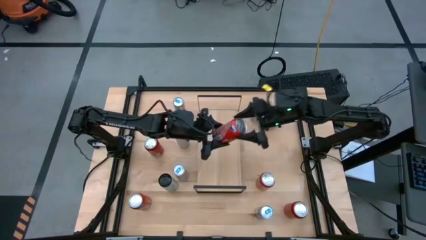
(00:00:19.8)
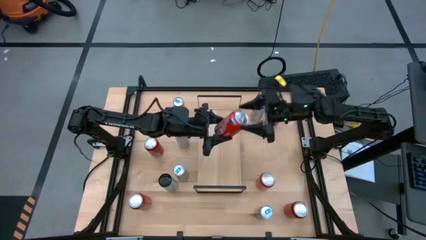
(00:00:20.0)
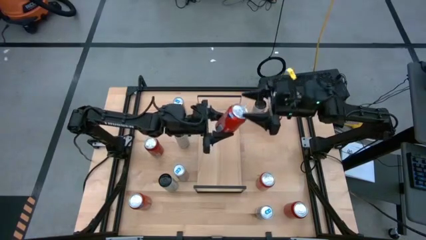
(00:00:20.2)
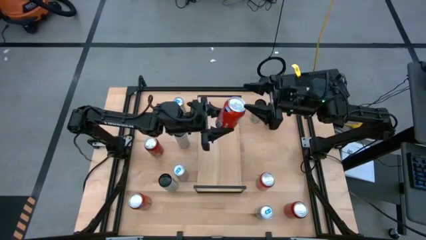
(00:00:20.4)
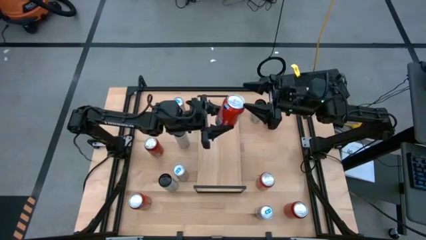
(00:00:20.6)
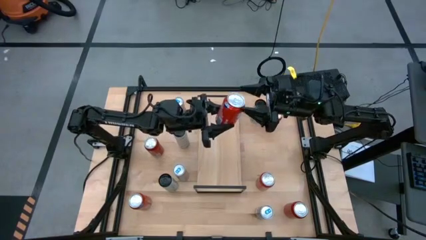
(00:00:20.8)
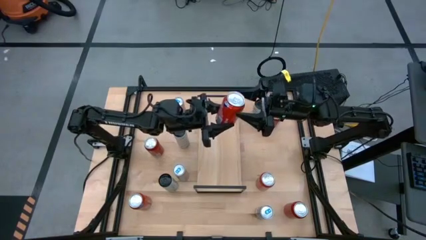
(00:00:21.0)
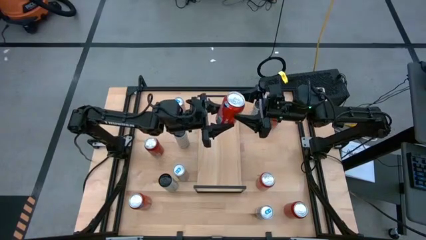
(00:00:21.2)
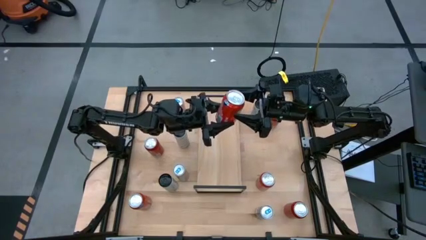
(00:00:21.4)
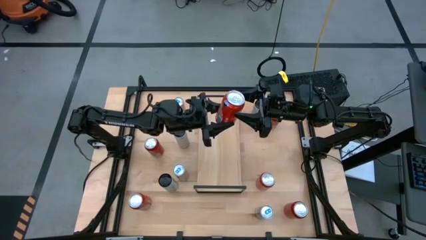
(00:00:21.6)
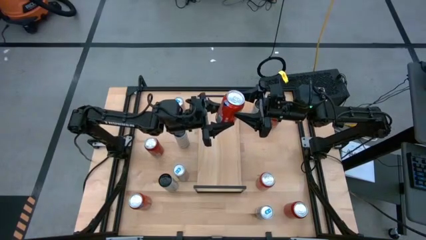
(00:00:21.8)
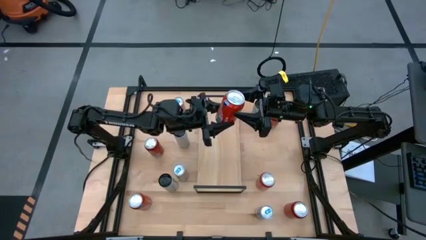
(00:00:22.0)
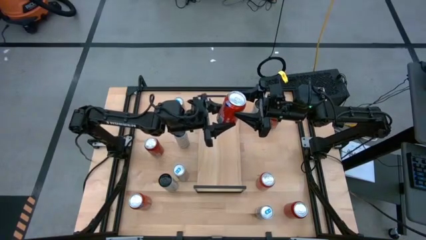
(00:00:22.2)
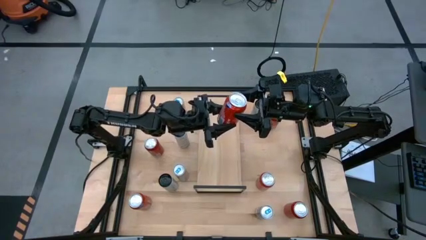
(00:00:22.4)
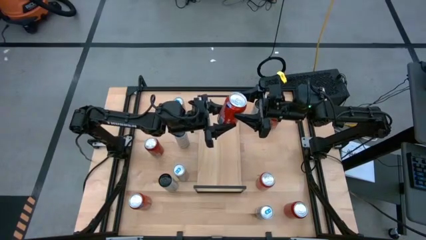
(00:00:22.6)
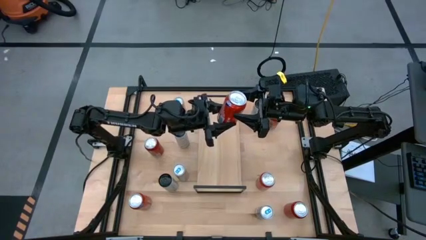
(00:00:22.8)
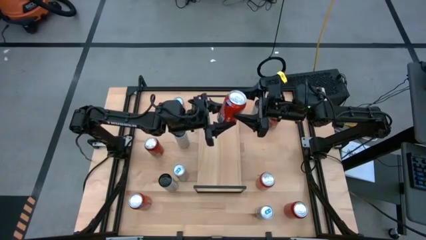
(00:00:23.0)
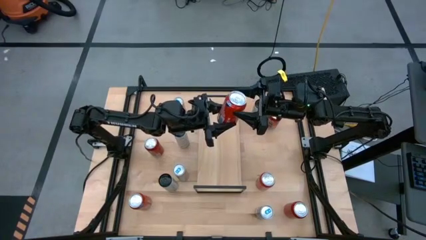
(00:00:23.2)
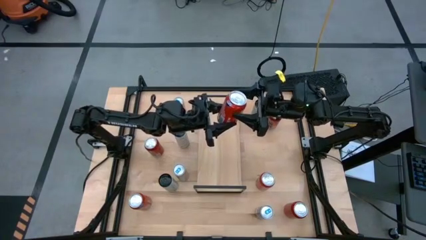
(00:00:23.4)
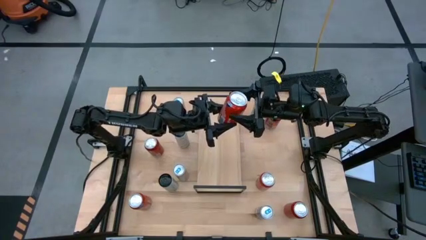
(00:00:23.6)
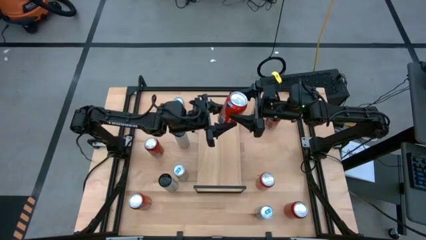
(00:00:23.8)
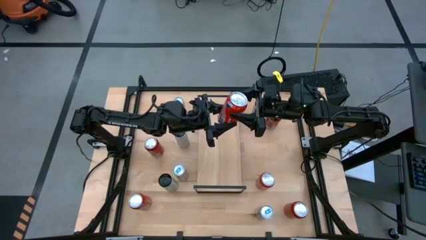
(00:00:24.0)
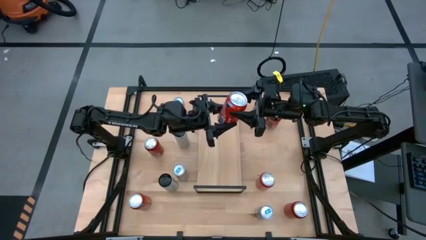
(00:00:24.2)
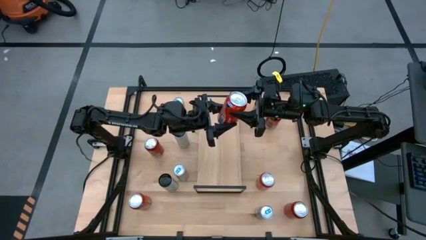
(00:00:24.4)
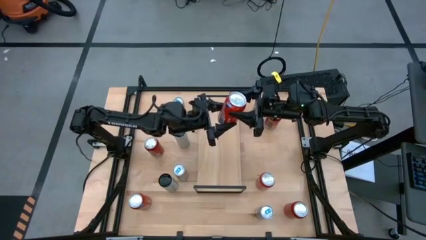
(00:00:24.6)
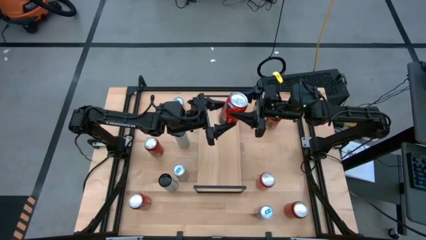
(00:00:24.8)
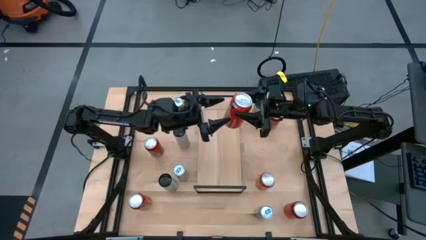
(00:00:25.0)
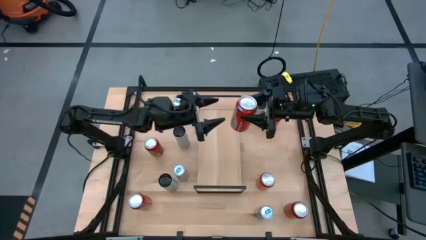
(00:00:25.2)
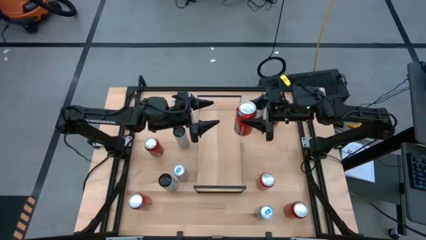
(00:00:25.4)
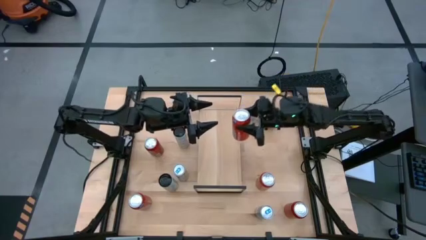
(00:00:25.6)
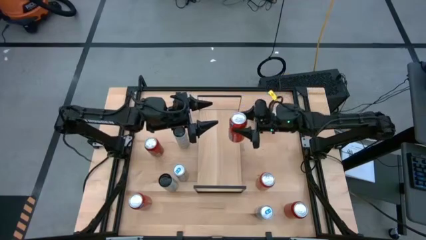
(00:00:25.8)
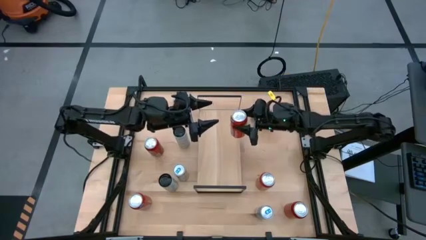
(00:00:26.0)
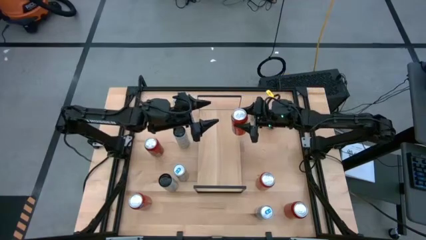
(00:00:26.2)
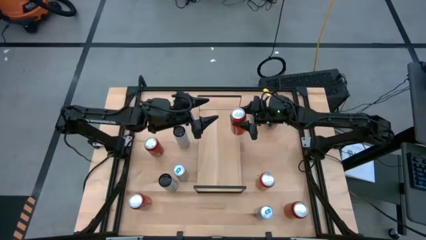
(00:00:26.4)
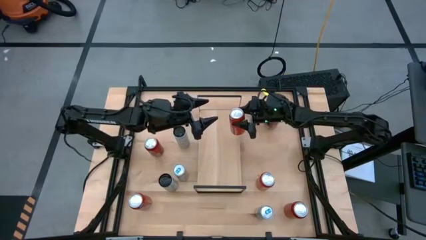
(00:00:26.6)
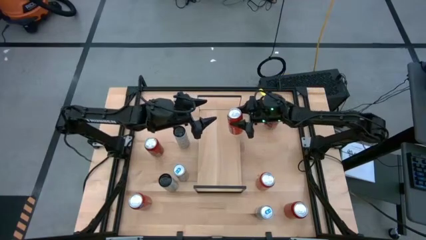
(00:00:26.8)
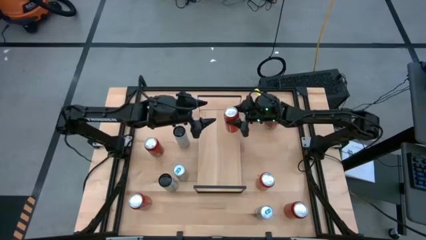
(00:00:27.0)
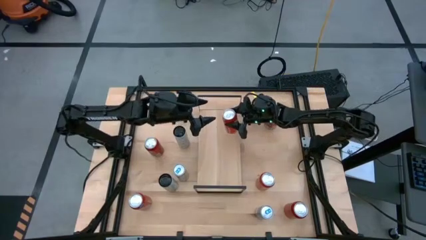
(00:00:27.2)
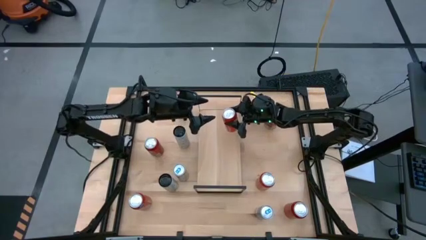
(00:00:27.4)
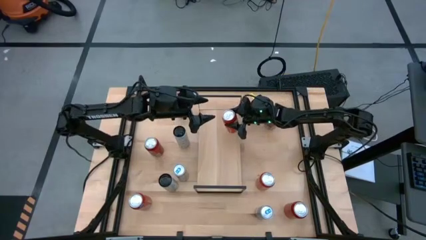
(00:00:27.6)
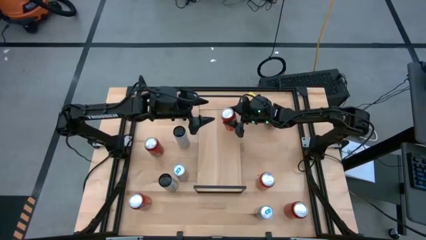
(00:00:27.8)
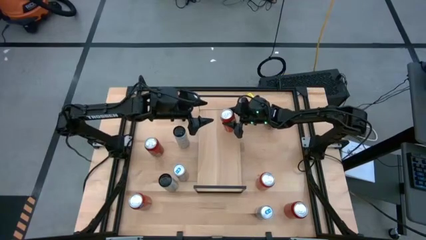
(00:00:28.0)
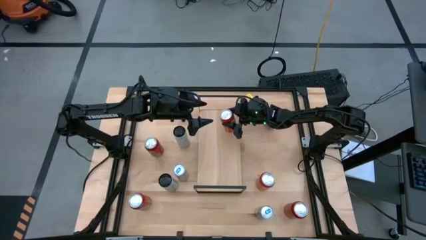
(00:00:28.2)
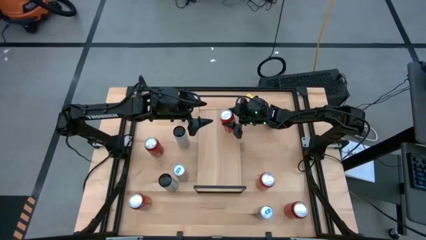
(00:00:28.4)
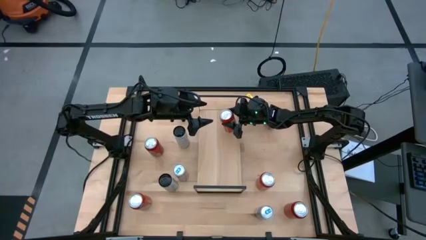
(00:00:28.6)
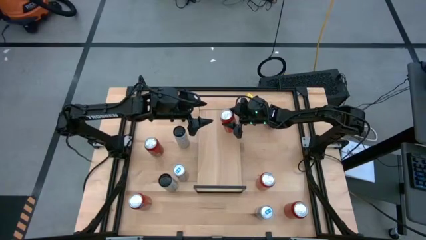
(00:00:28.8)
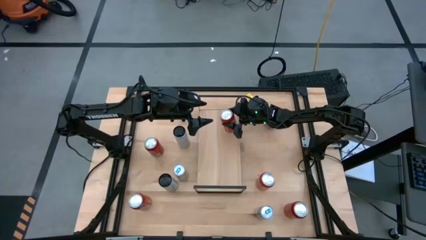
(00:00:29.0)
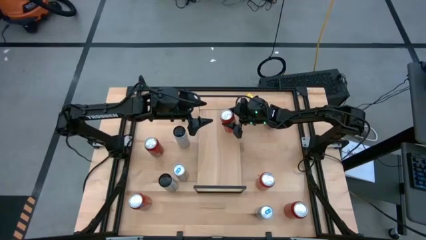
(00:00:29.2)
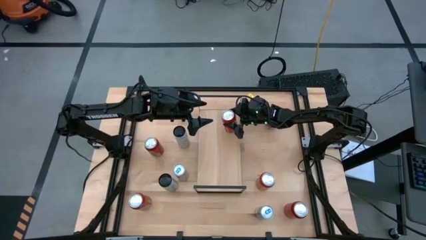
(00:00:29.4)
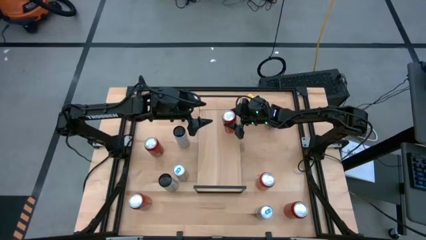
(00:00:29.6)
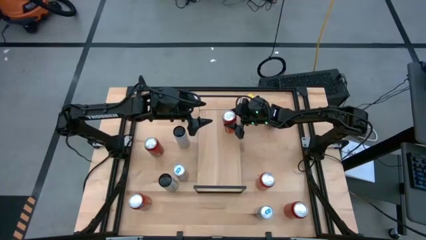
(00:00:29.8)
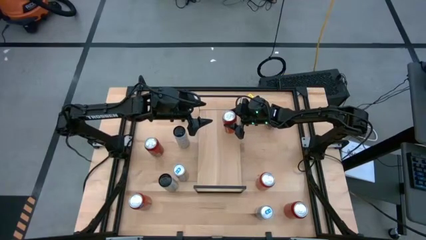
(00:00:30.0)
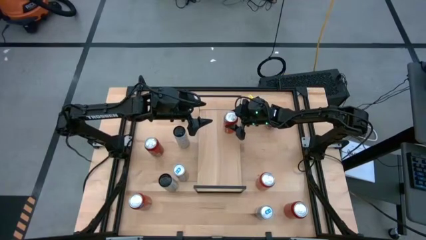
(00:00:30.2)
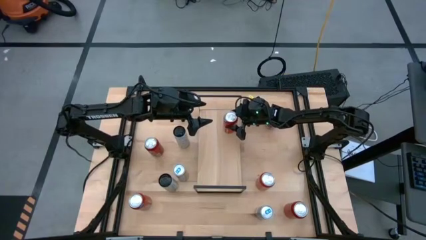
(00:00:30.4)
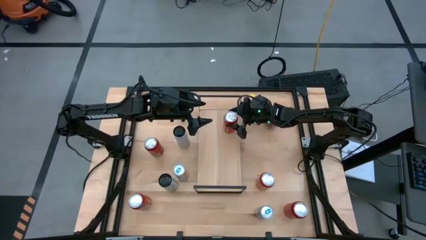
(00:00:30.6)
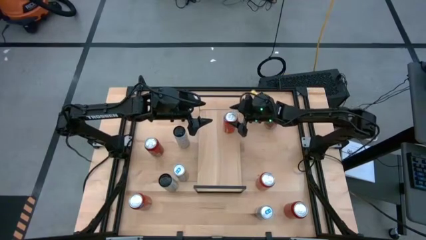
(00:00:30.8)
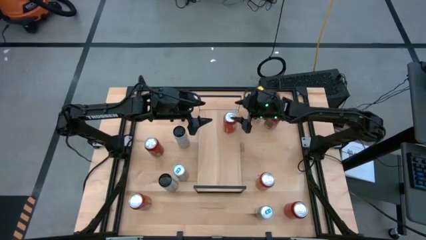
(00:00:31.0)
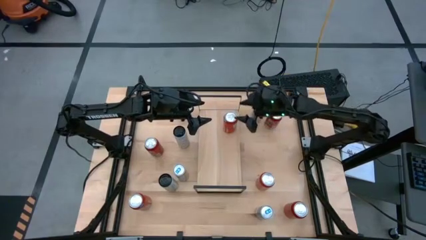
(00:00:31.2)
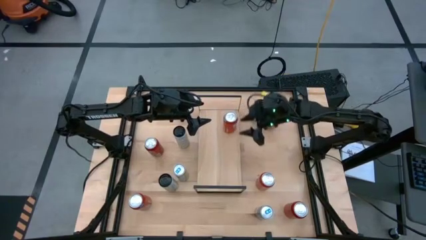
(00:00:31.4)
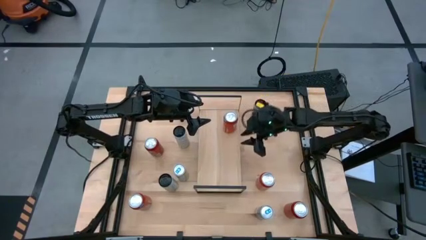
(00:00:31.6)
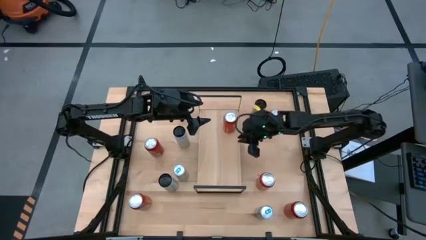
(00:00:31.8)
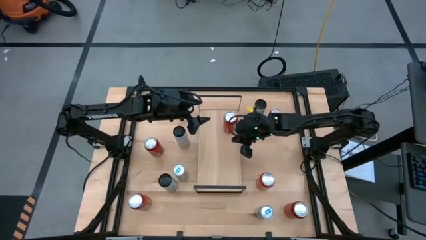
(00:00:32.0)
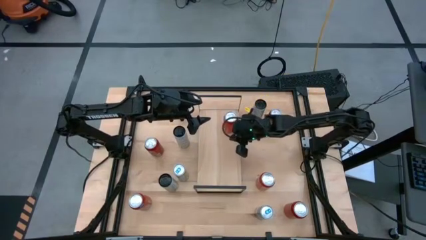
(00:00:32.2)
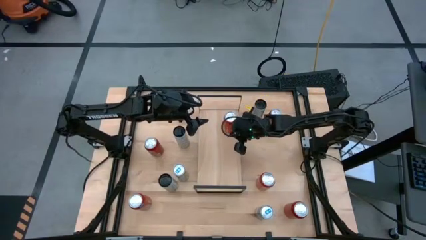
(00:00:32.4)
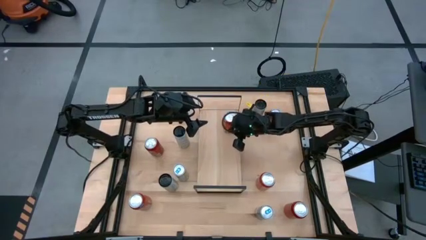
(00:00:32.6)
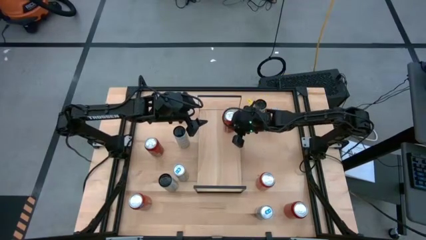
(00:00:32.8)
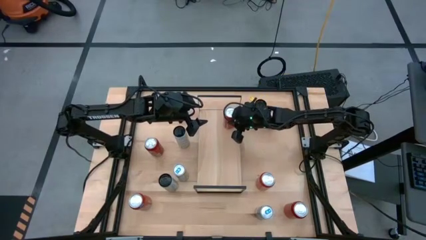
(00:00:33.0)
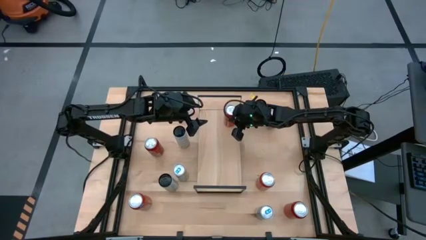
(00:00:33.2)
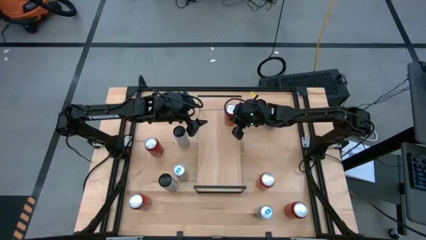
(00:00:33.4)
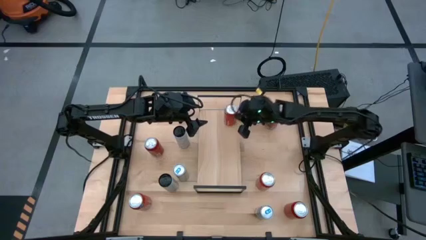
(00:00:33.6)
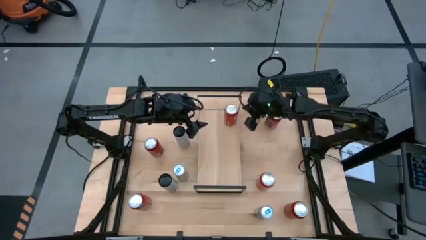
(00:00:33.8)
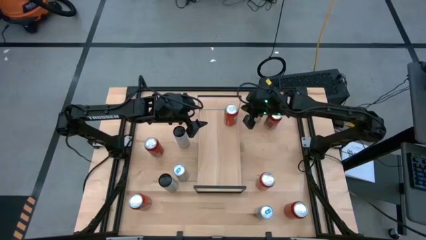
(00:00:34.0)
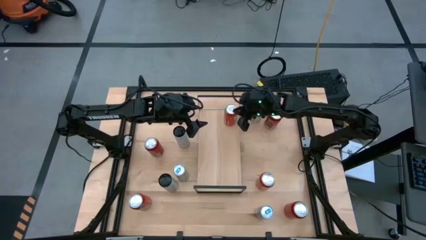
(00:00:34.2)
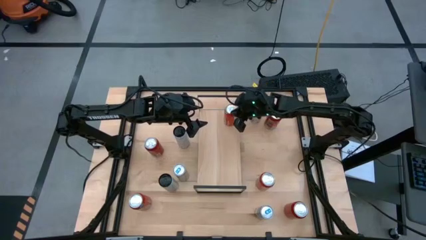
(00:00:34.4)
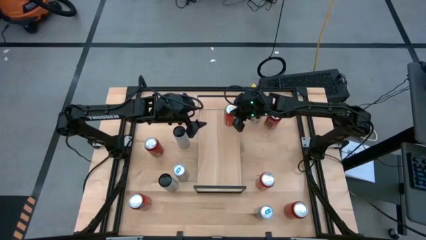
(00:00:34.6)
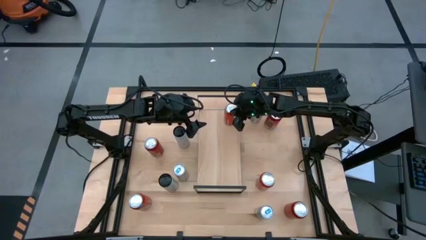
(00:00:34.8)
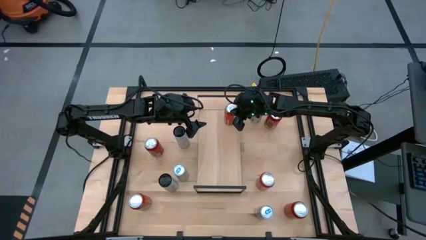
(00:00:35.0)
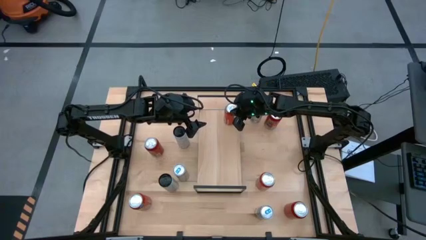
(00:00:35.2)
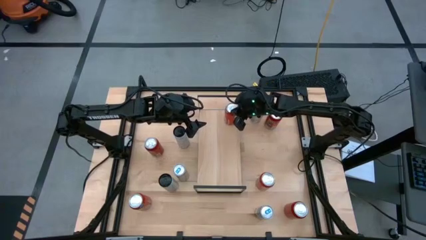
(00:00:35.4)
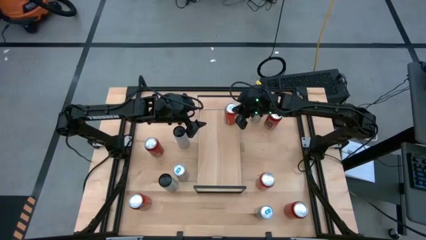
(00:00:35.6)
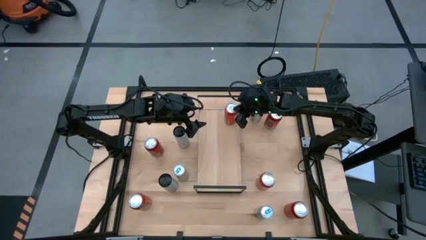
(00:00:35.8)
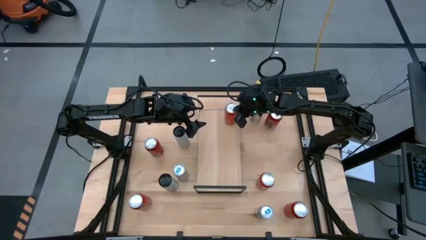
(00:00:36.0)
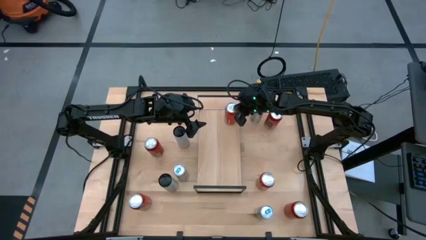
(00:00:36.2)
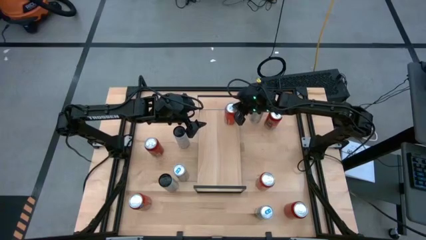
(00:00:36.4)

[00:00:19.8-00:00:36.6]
Task: Place canned beverage on shelf
Put the top right orange soda can on the shelf
